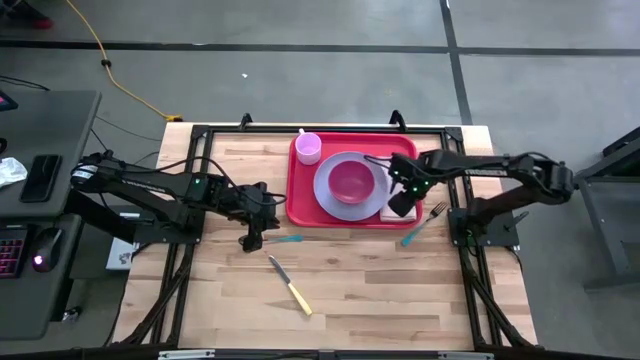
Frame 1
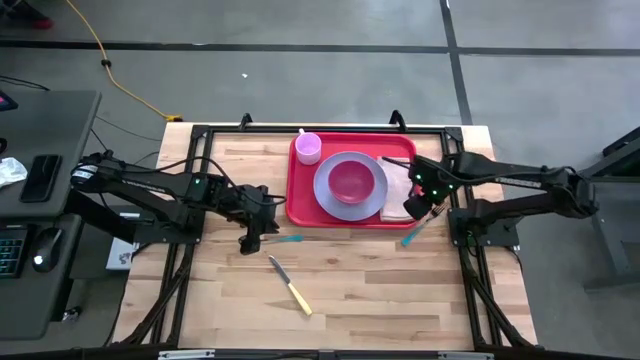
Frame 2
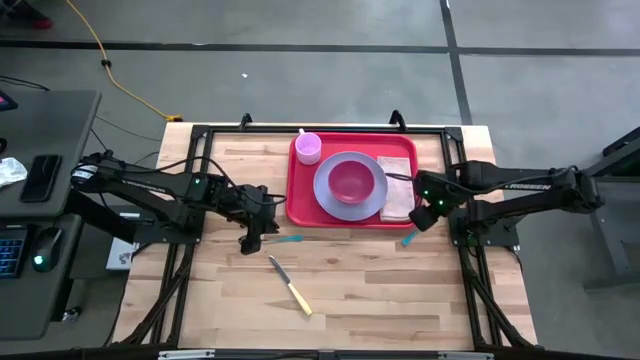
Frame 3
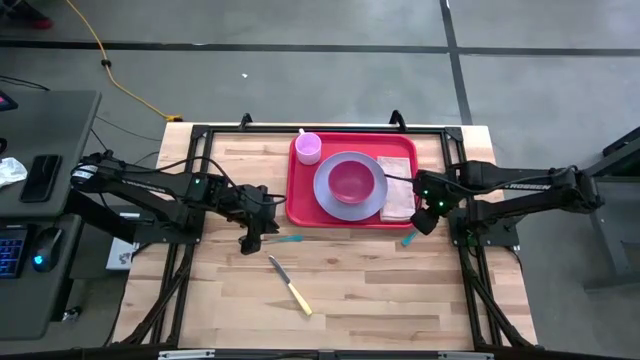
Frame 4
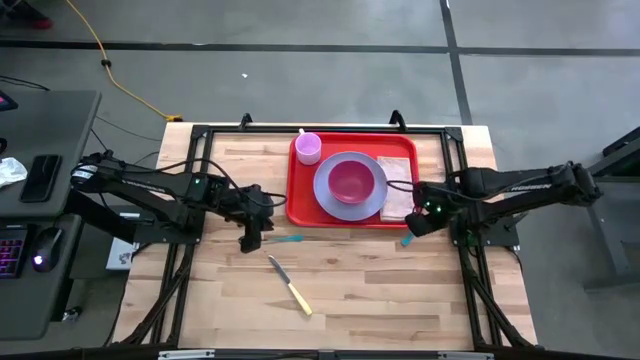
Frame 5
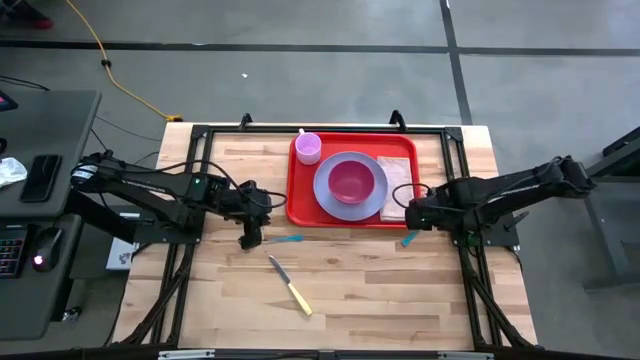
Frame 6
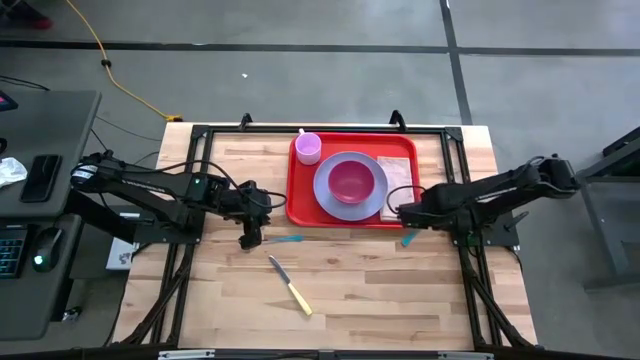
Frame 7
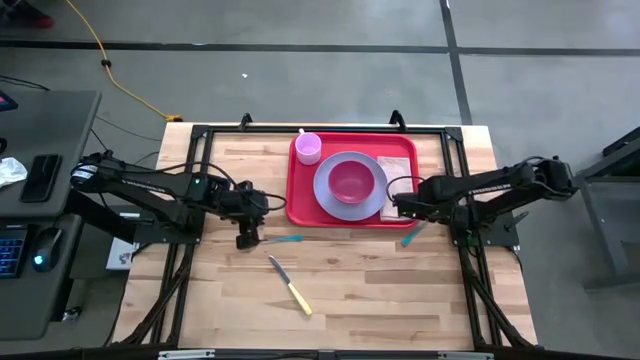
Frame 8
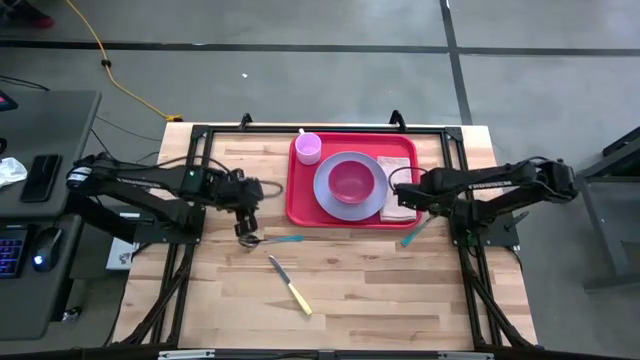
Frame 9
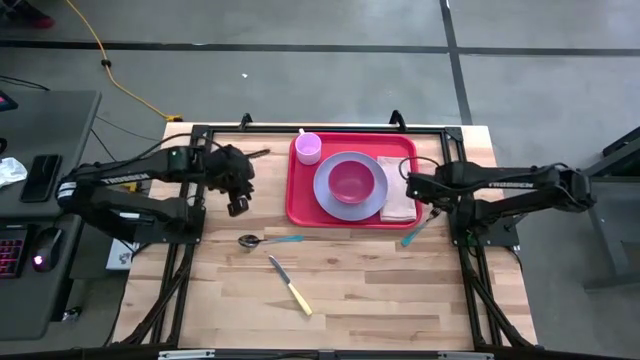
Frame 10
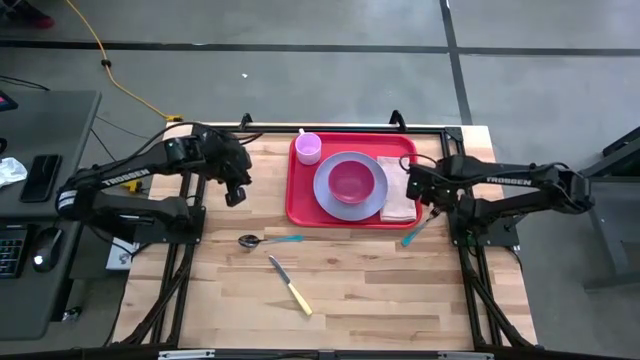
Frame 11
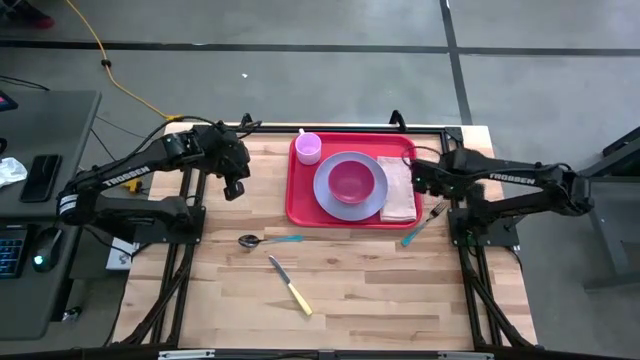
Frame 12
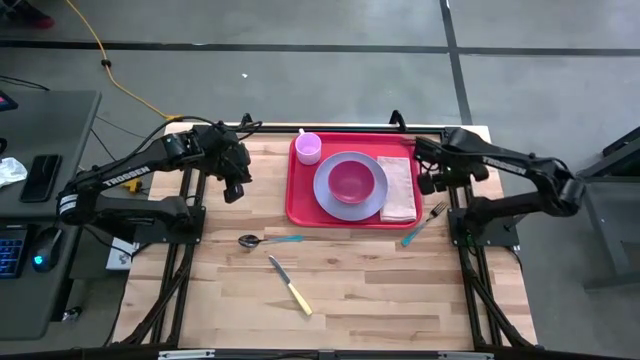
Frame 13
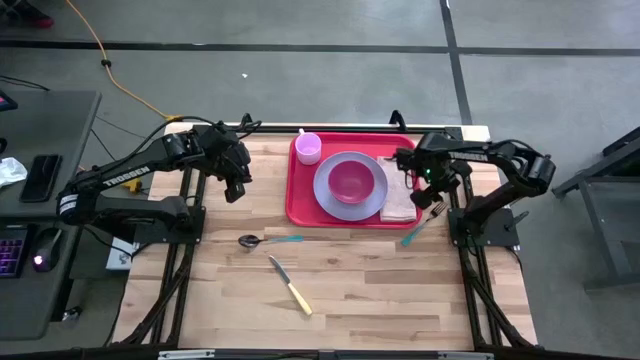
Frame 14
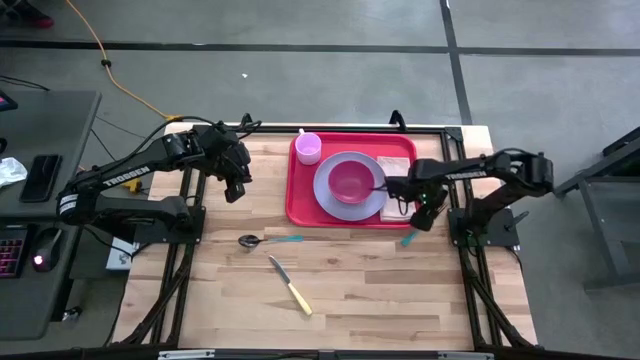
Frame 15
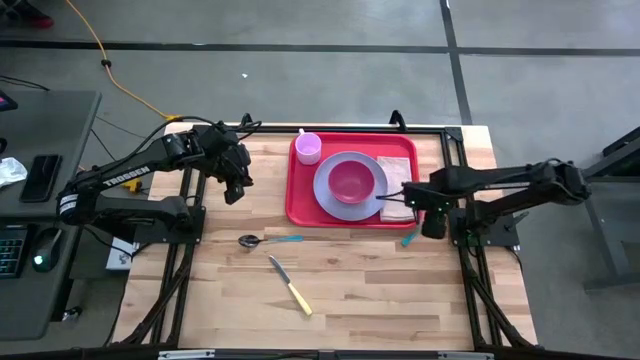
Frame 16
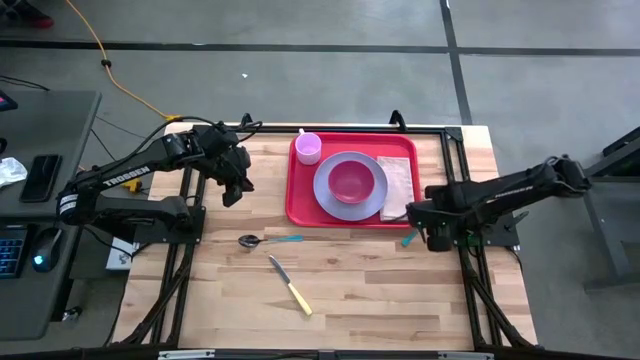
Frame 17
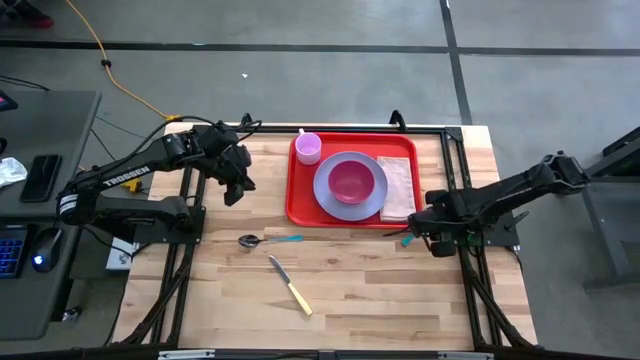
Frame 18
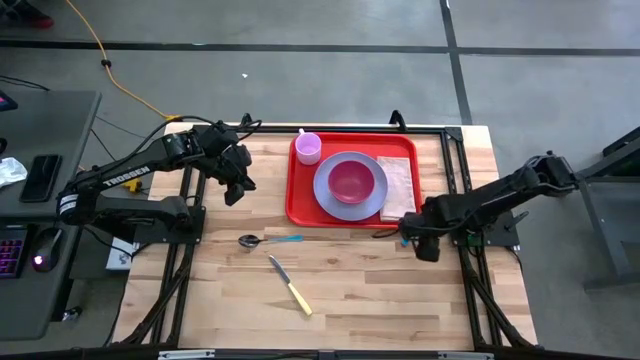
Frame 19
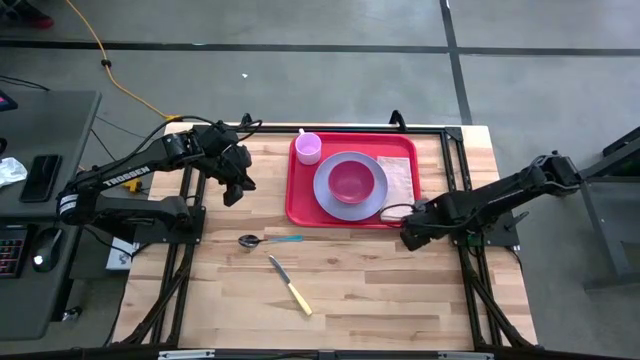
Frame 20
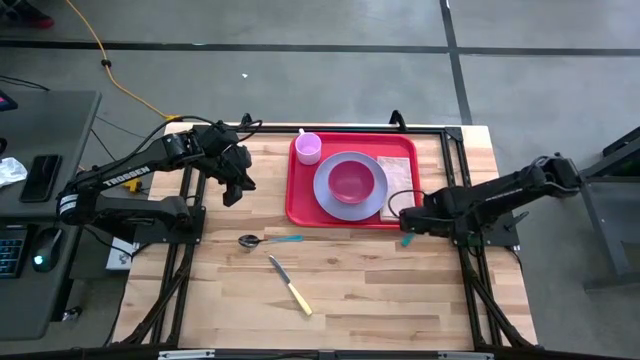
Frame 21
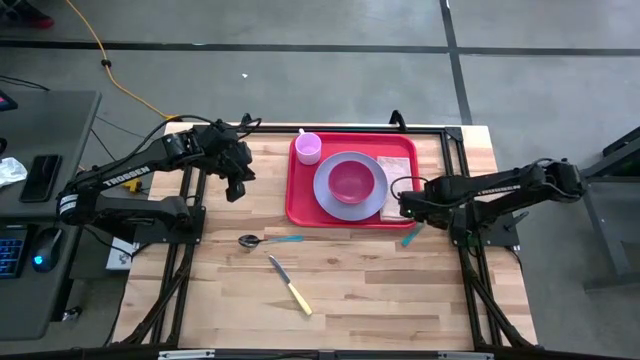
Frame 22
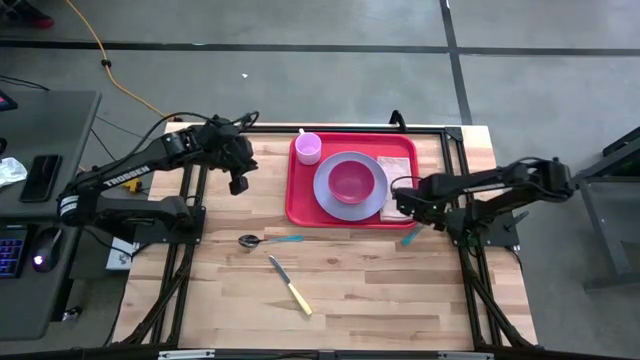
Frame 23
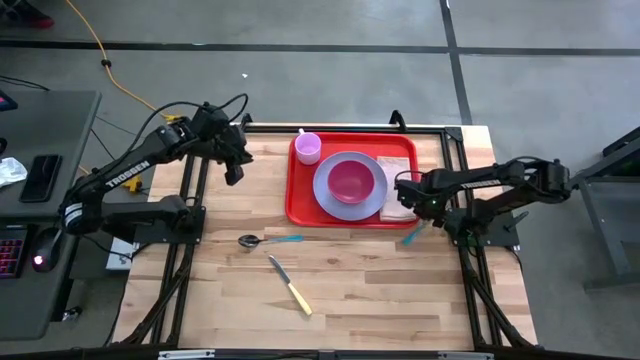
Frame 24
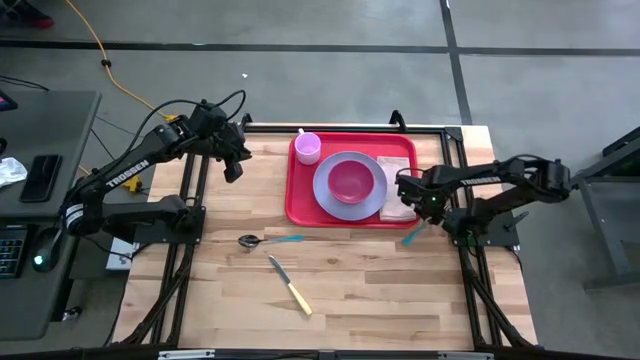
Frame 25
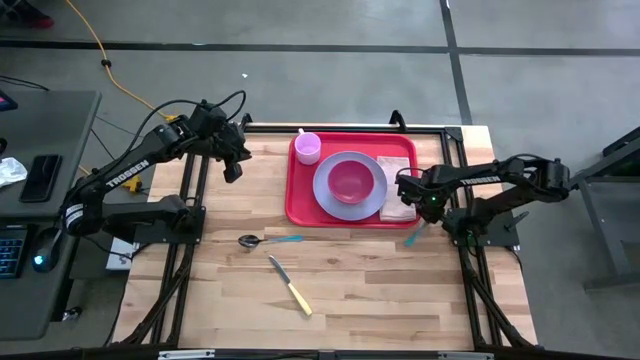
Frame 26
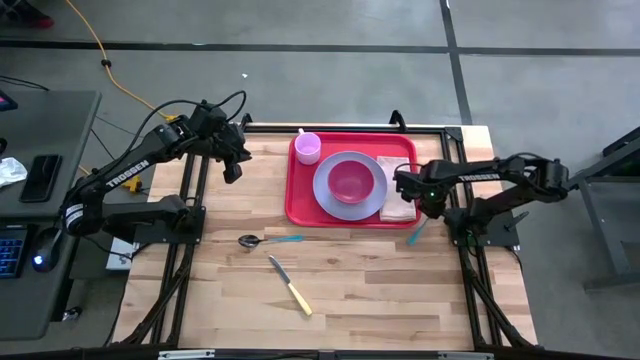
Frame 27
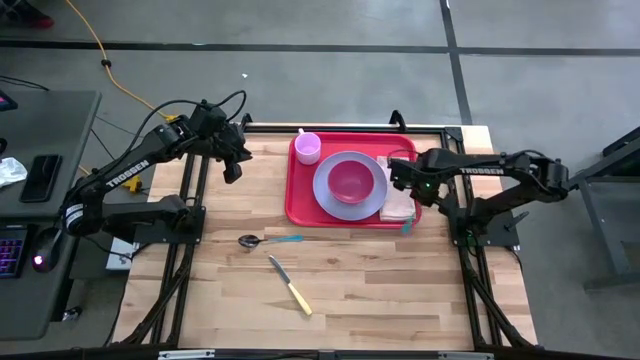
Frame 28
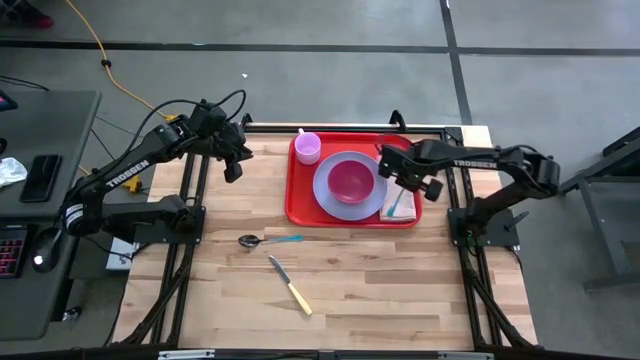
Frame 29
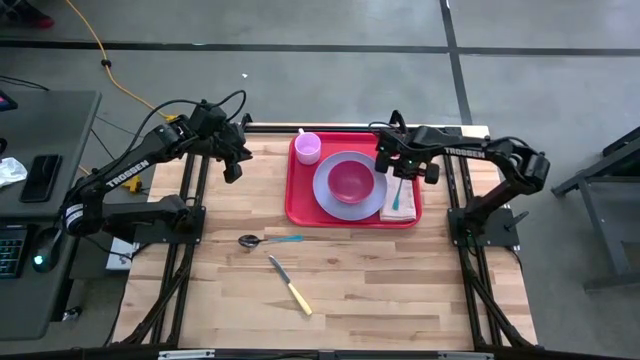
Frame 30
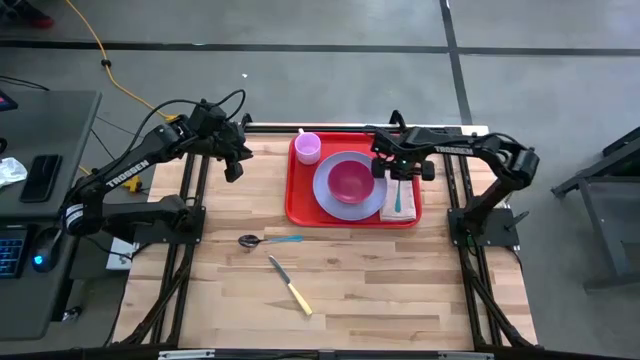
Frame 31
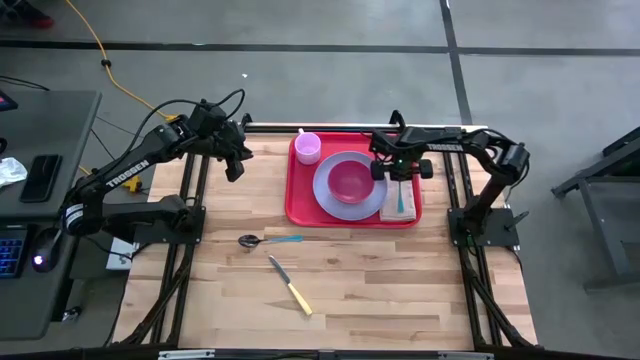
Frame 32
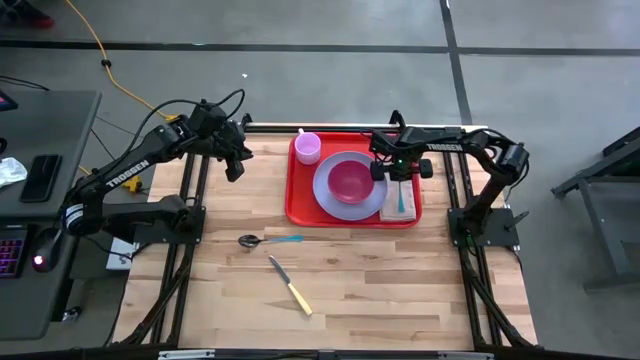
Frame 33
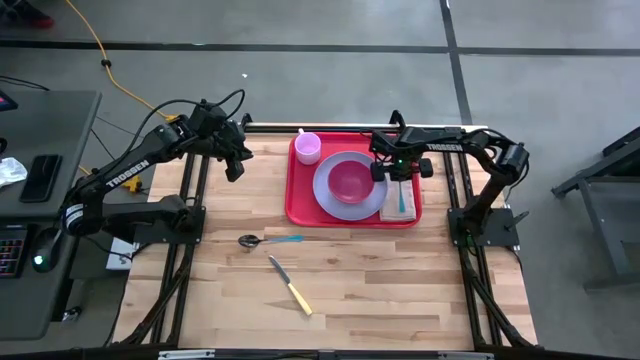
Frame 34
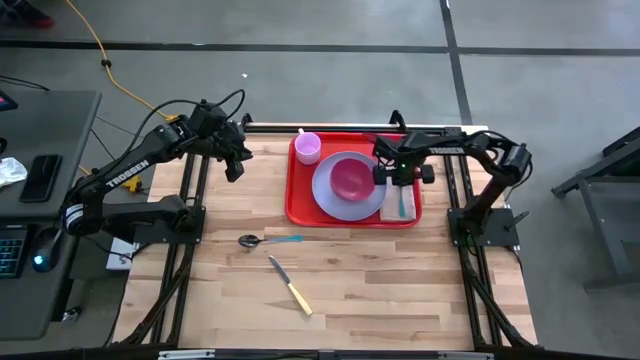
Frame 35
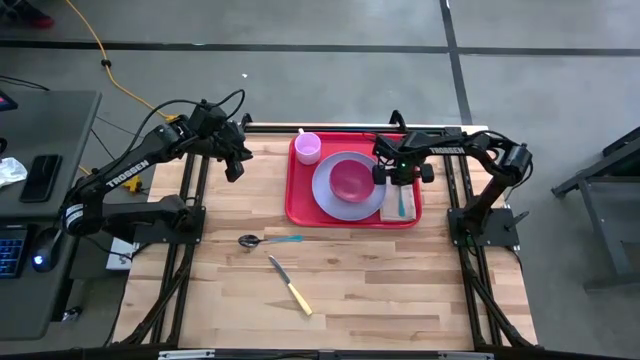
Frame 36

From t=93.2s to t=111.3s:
Task: Set up tray
Put the blue fork on top of the napkin to the right of the purple plate in the red tray

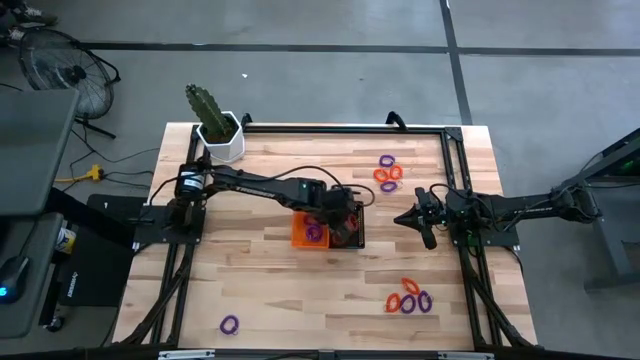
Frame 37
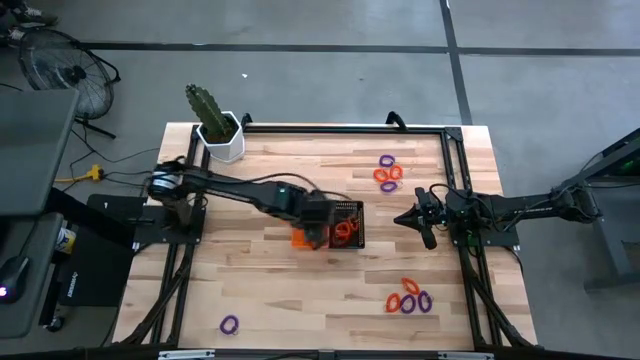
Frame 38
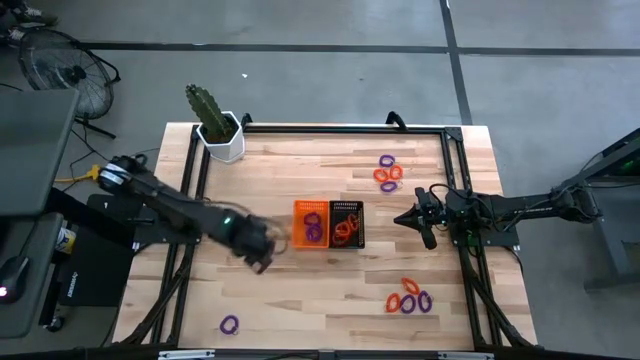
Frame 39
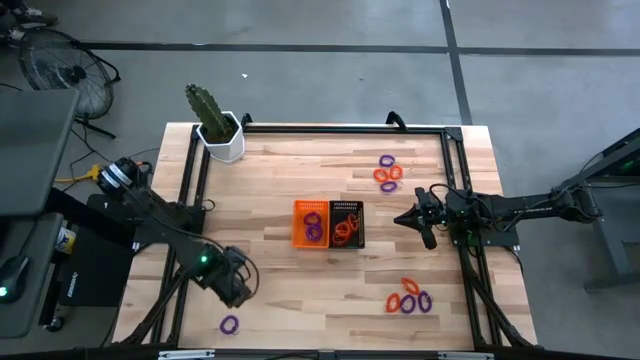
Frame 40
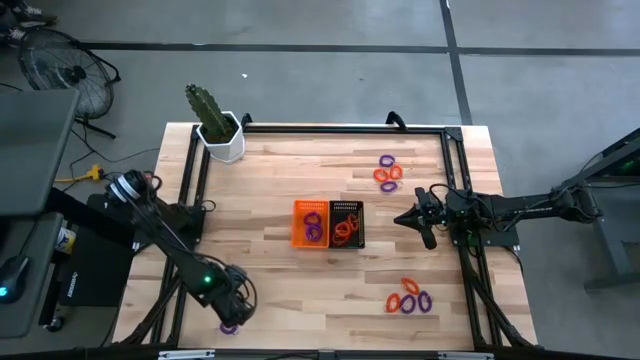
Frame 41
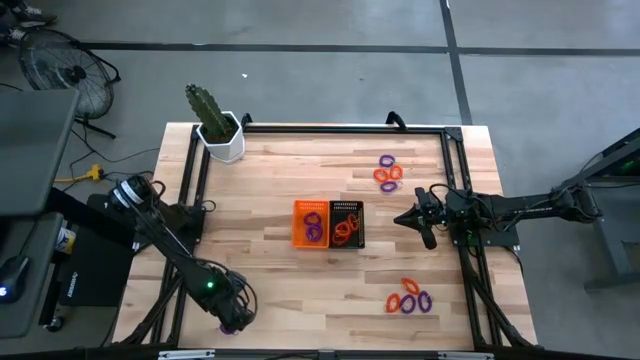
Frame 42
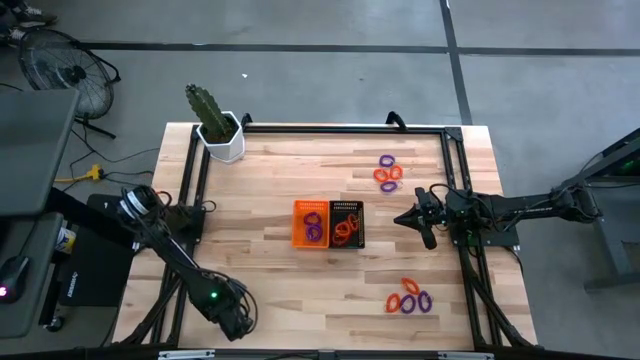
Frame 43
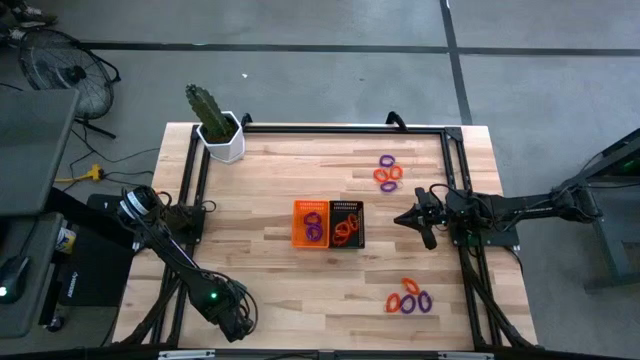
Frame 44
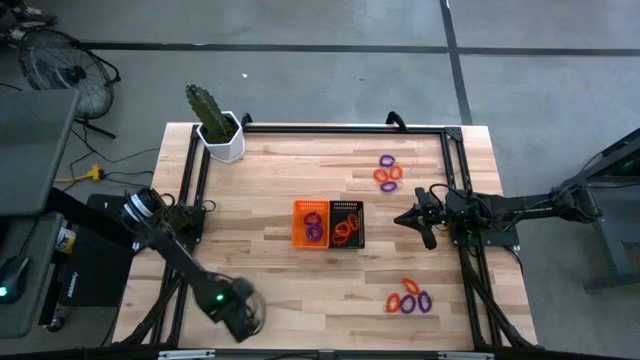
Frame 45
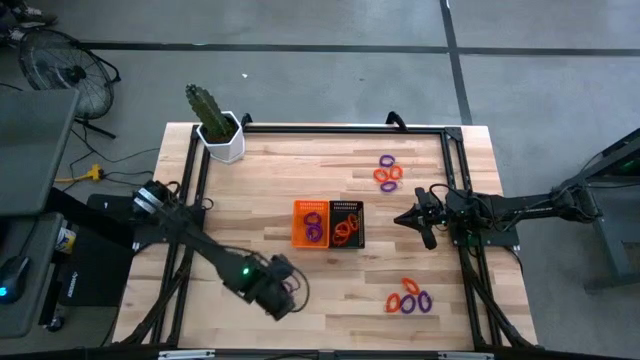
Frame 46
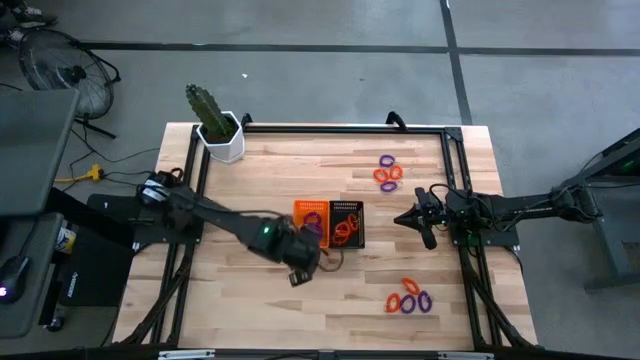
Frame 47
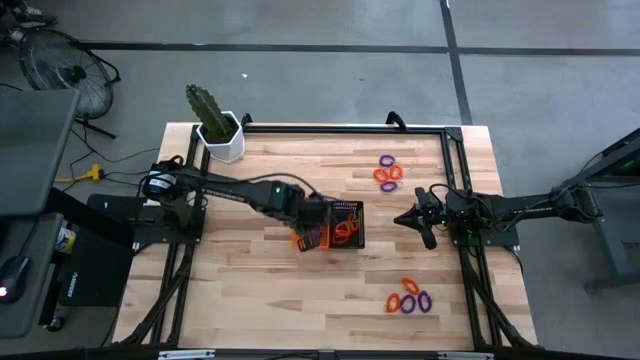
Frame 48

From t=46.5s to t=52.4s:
Task: Sort spring keychains
Put the violet spring keychain into the orange bin
